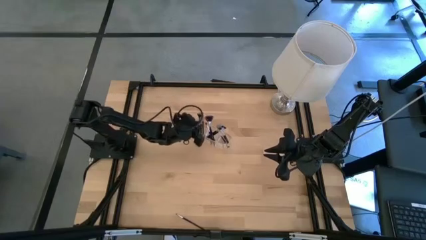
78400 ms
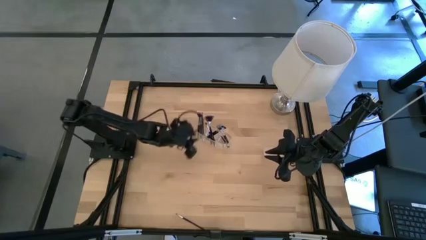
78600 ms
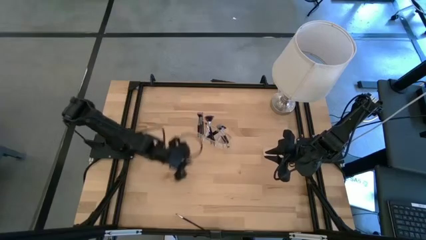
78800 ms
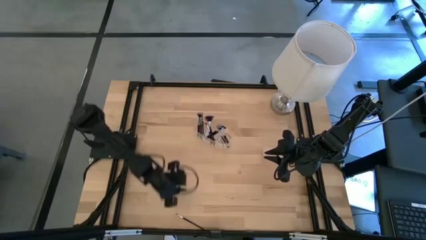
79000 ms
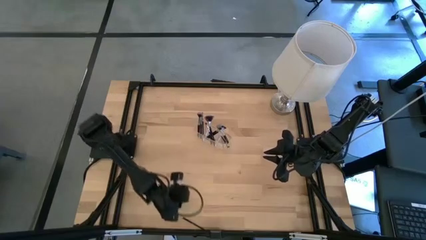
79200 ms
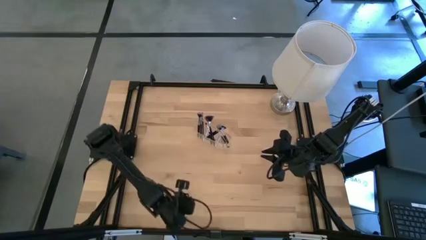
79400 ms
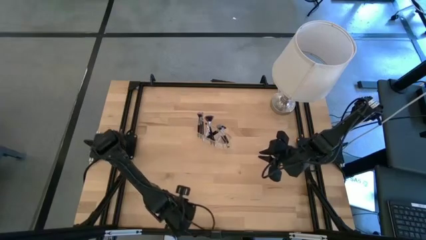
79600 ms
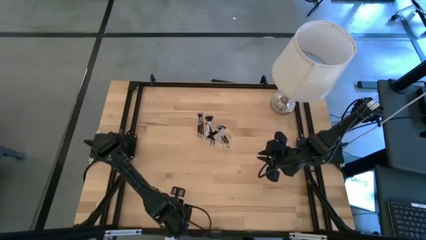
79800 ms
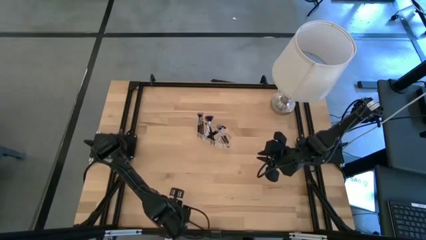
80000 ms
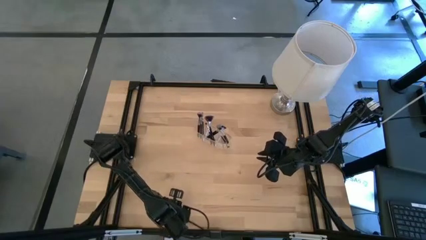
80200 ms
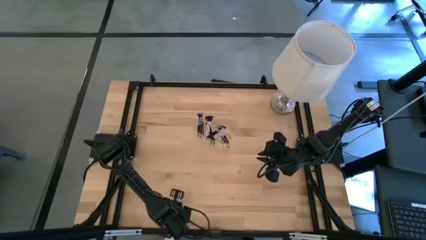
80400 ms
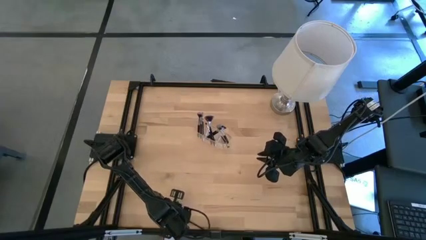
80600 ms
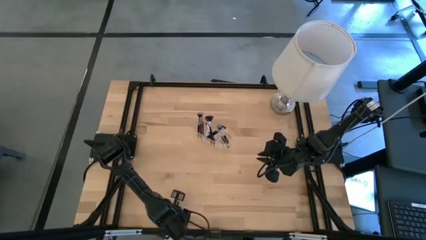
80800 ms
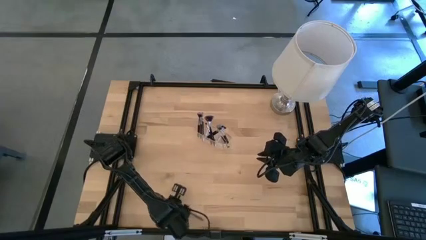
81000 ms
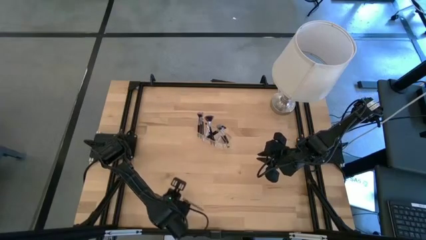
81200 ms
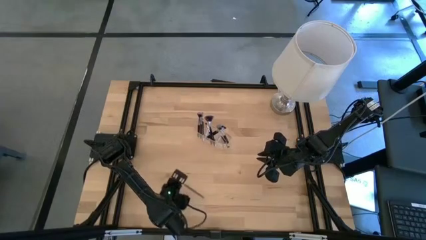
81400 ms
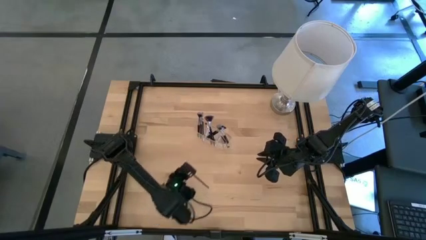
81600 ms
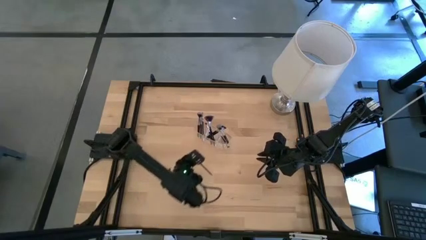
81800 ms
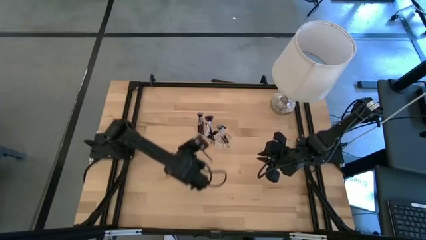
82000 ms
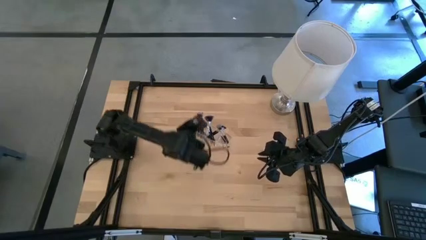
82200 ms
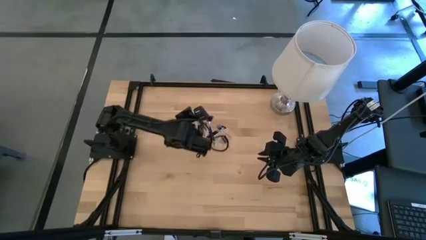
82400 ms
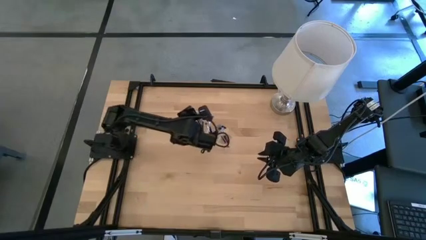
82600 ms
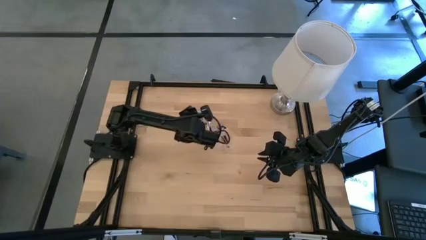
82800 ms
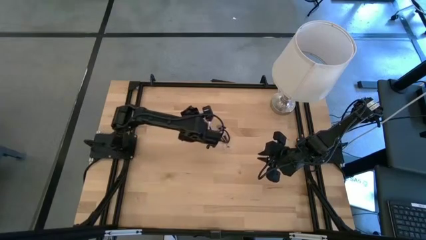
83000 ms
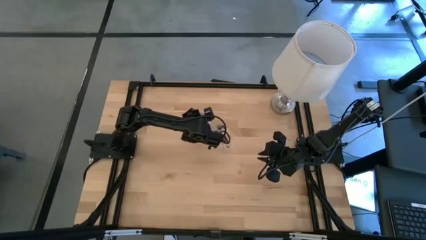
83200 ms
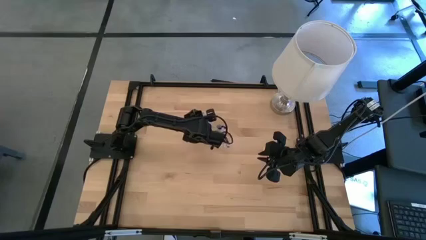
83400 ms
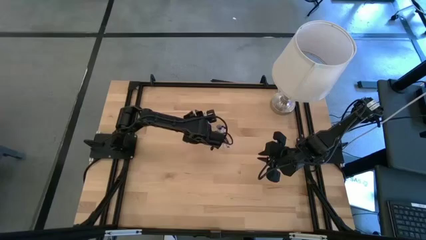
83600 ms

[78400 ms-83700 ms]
Task: Put items in baskets/containers
Put the eyeshadow brush into the transparent organizer

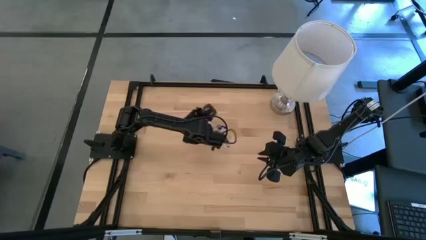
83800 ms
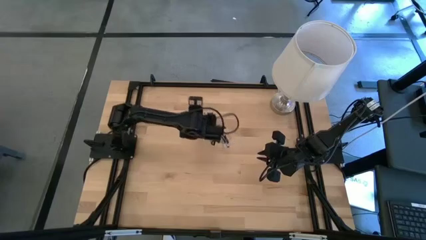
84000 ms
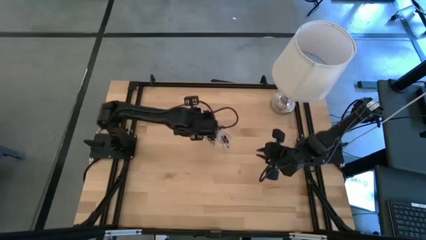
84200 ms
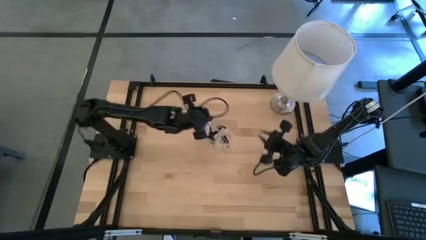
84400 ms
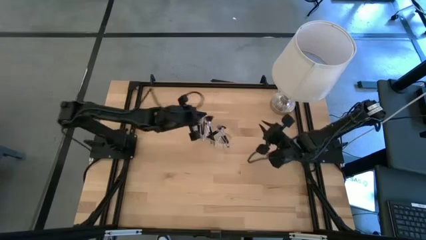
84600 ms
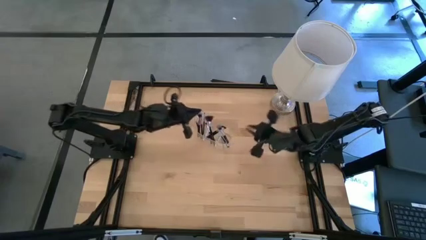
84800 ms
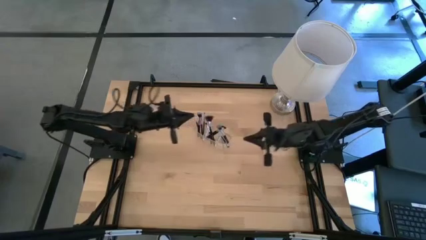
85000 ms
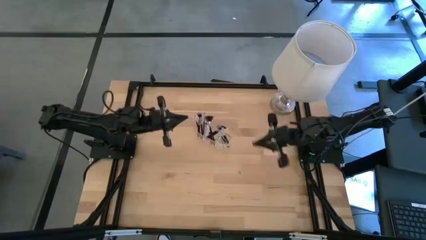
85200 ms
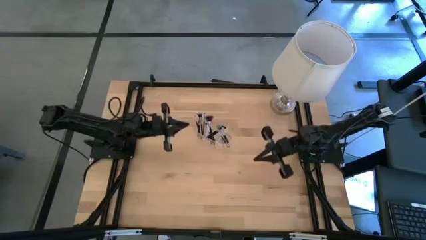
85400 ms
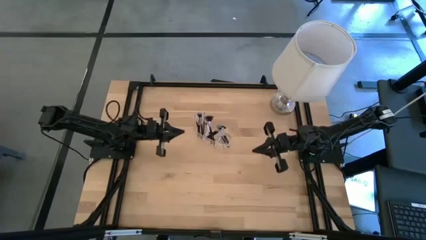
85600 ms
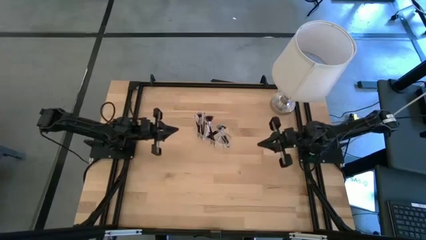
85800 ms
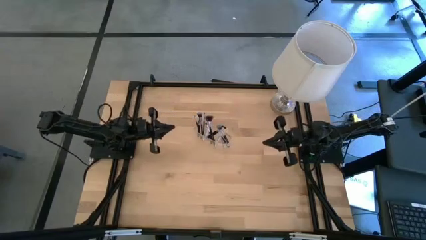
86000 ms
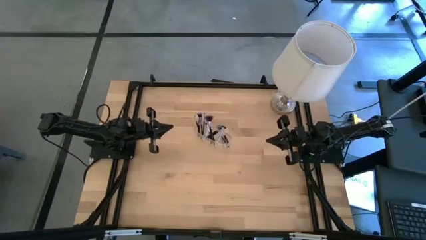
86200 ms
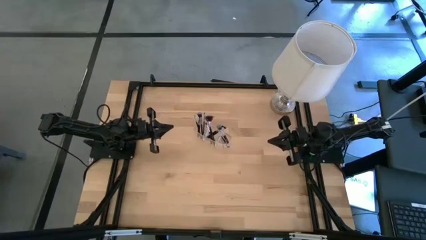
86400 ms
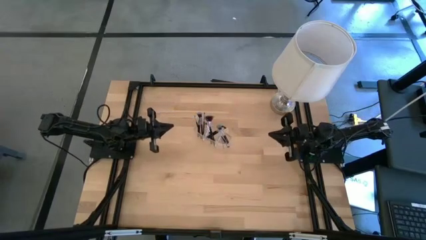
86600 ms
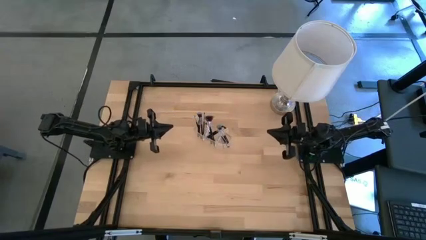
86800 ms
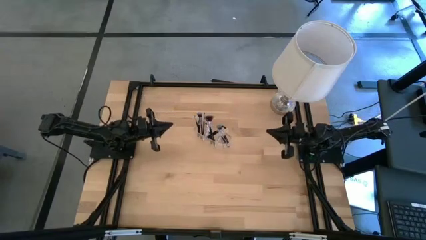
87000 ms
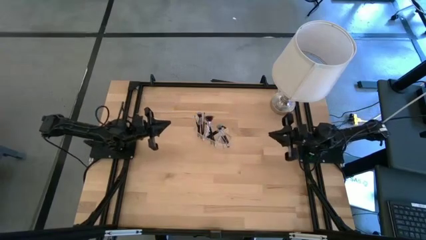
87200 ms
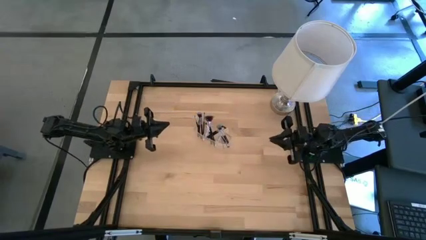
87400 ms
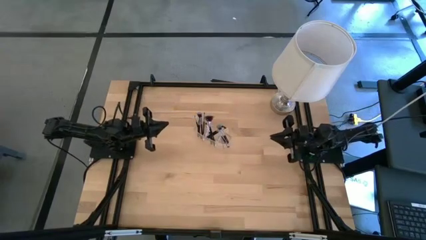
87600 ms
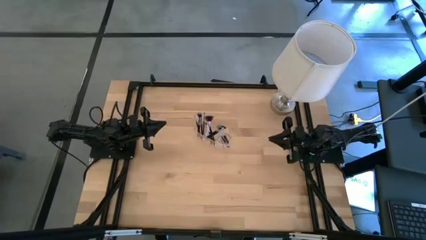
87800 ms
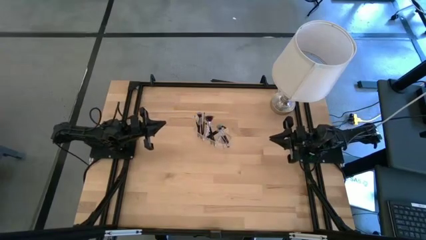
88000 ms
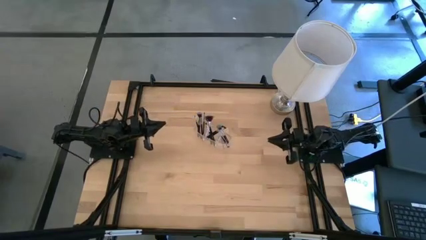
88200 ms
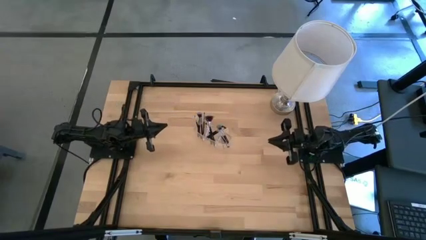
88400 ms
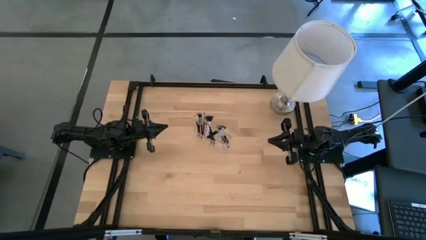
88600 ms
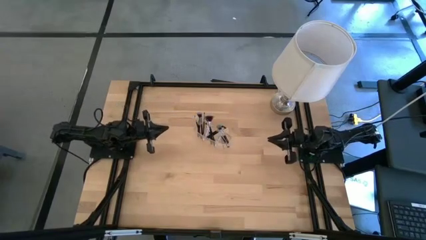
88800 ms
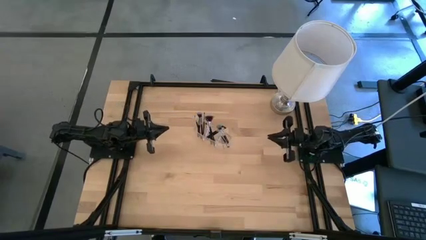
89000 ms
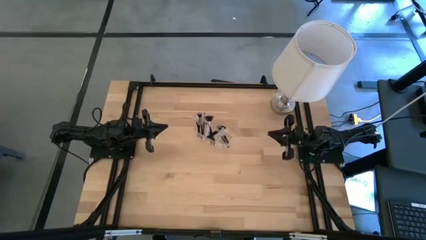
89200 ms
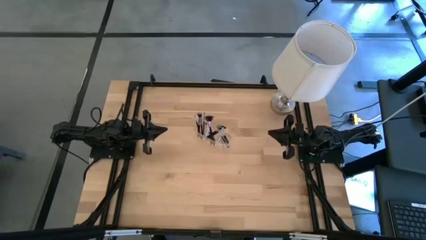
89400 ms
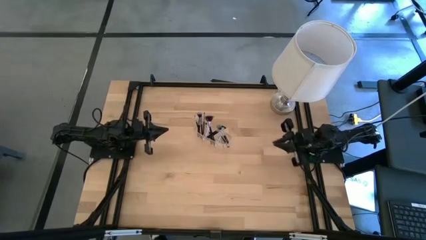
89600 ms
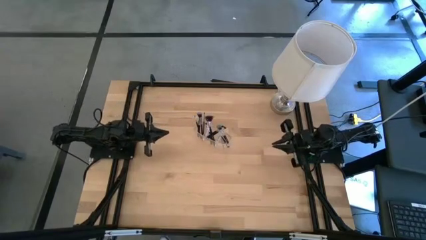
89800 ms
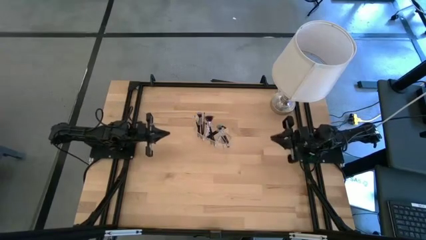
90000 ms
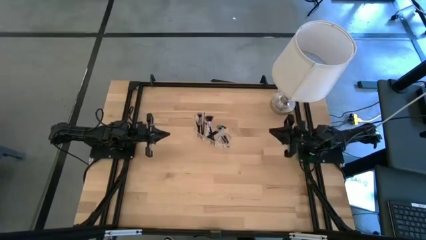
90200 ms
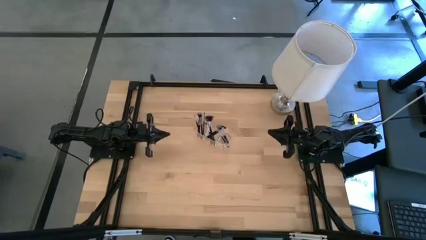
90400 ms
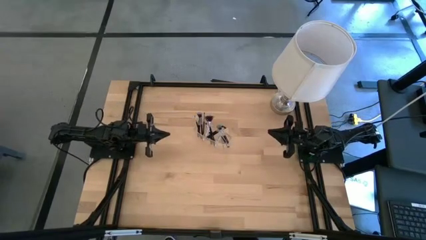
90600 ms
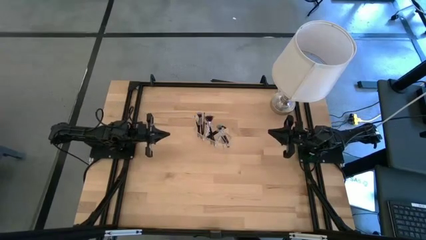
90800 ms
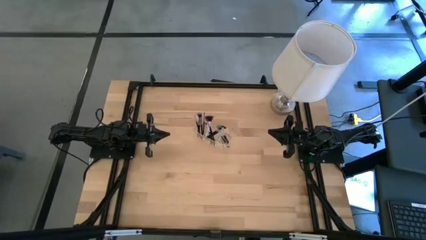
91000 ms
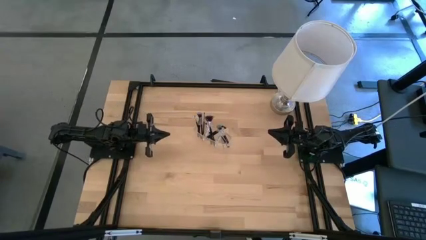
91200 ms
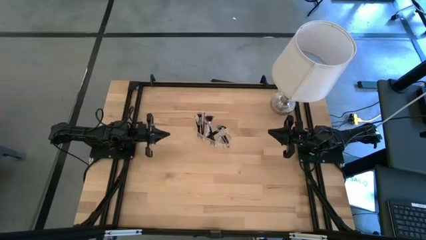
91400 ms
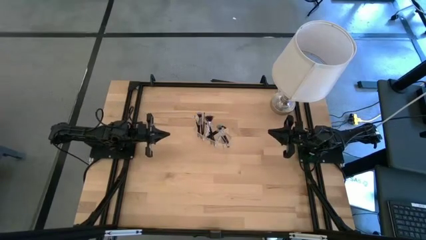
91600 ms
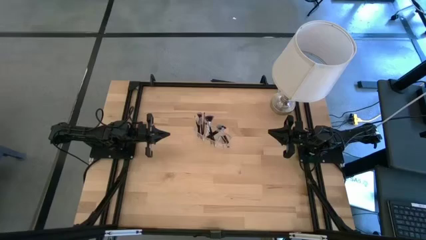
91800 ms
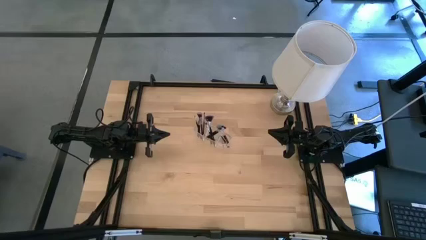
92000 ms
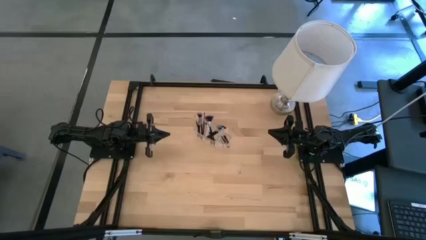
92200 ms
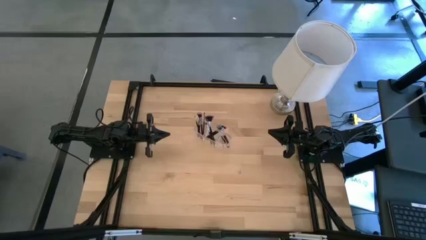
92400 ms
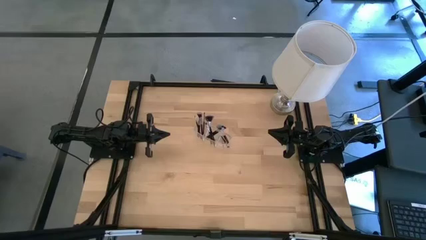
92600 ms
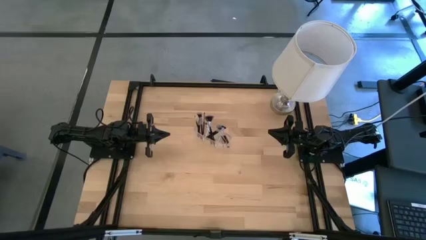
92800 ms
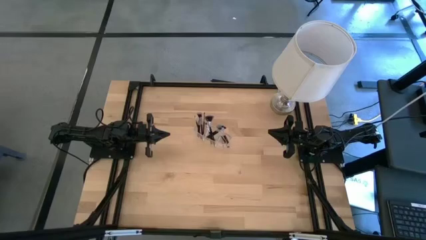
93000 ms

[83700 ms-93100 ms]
Return to Home Position

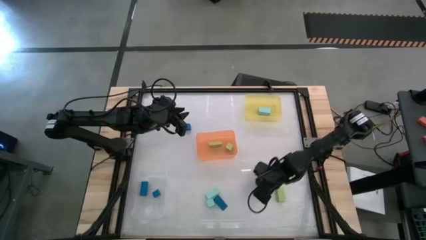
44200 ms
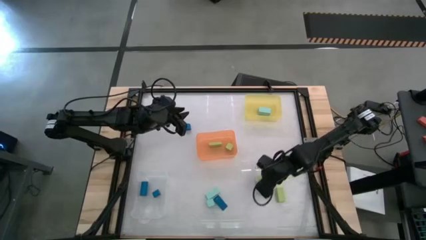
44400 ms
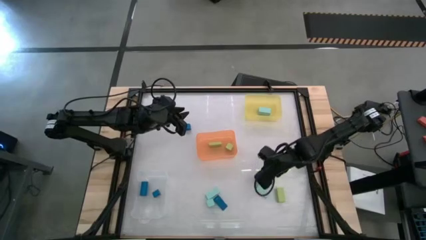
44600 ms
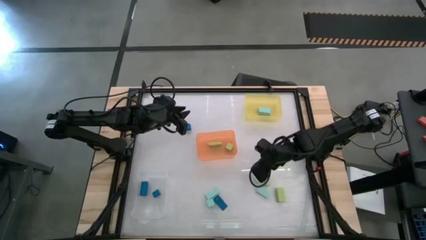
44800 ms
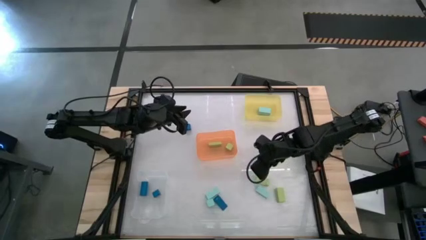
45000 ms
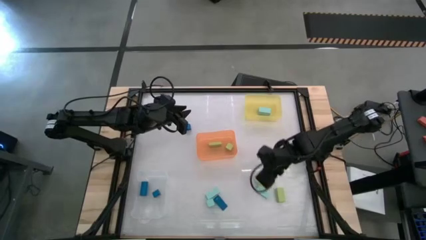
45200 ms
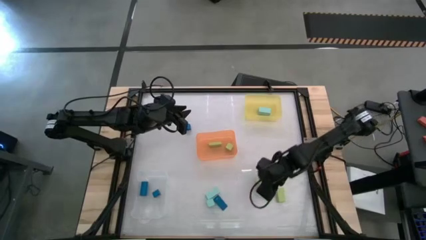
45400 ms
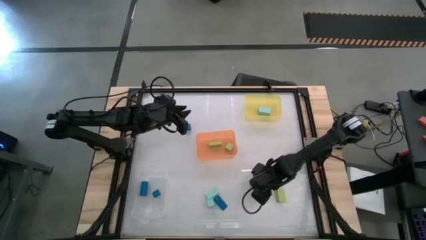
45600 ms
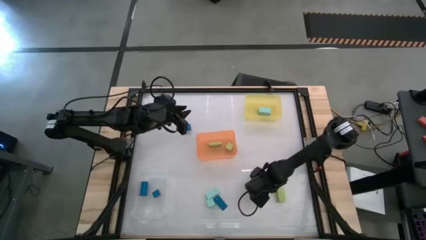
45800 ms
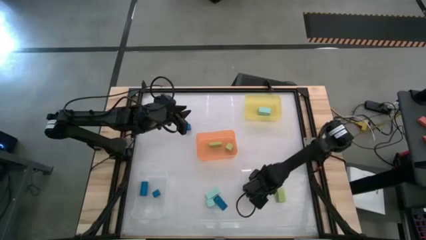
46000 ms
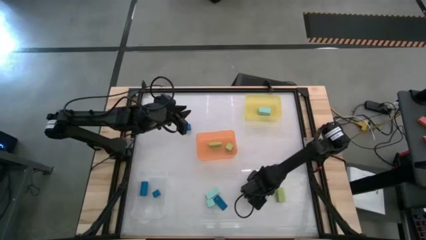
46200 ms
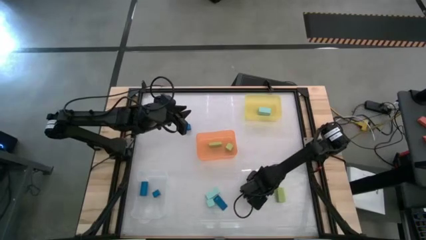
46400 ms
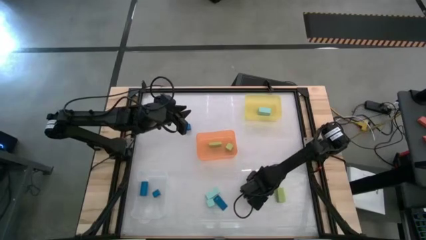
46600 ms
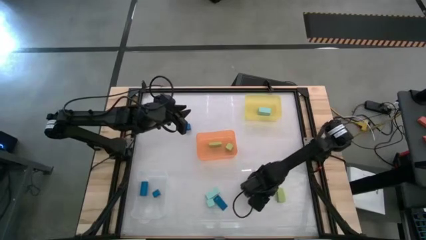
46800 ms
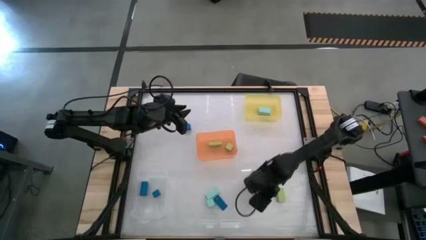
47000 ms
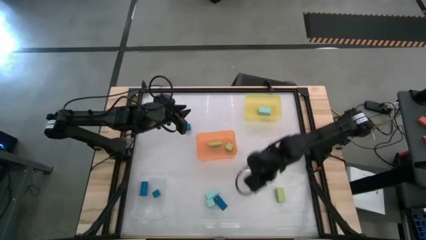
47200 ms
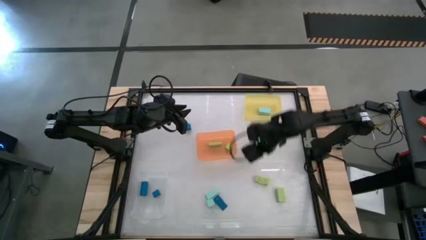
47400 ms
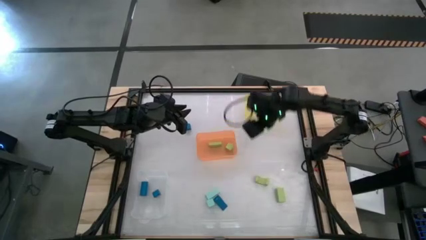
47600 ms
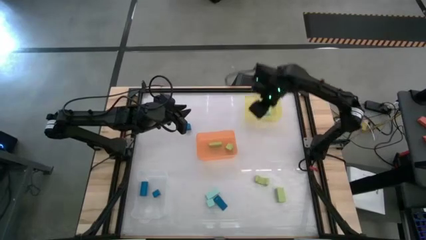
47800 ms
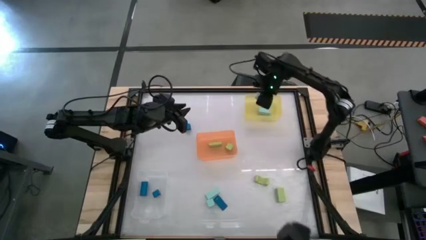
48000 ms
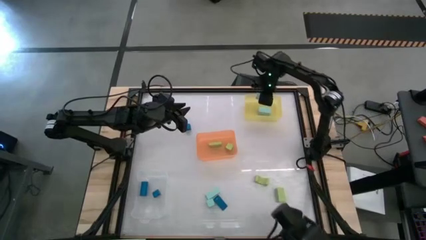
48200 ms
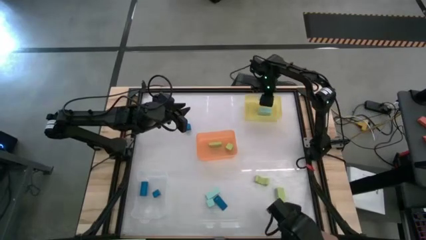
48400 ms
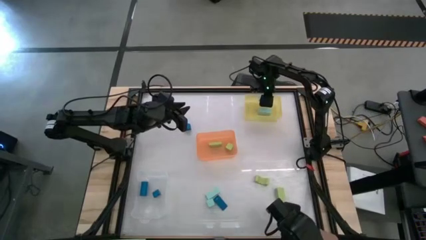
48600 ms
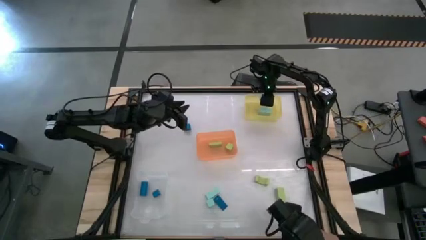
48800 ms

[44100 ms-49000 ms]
Task: Sort & place blocks by color
Put the light blue block into the yellow bin
